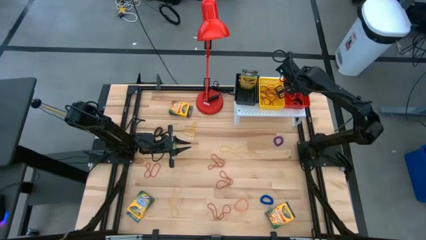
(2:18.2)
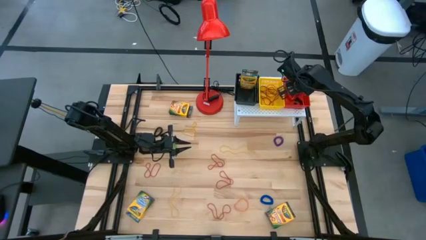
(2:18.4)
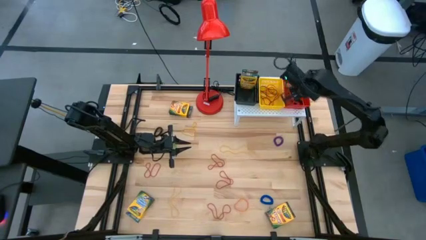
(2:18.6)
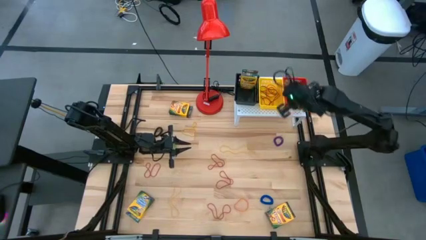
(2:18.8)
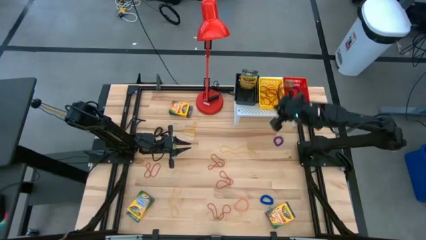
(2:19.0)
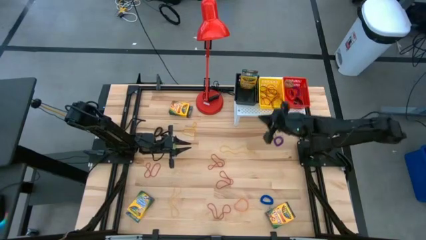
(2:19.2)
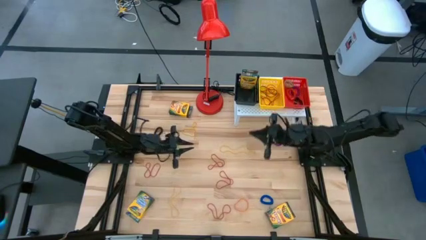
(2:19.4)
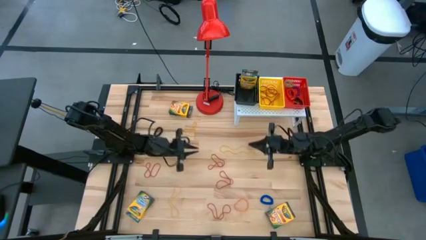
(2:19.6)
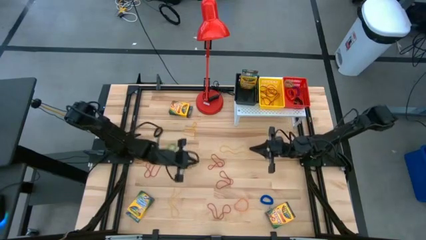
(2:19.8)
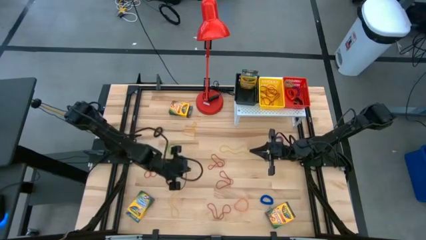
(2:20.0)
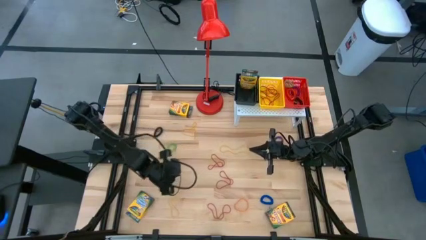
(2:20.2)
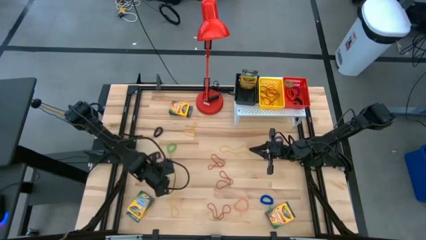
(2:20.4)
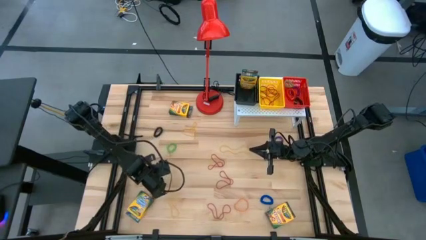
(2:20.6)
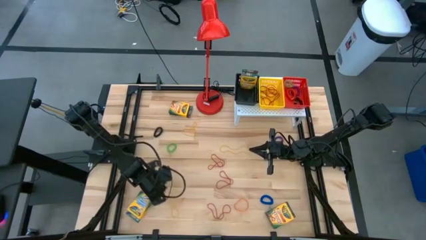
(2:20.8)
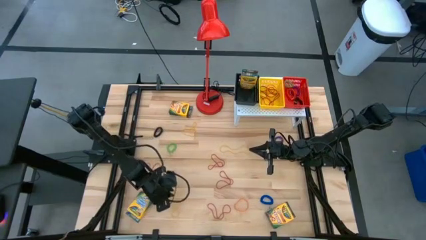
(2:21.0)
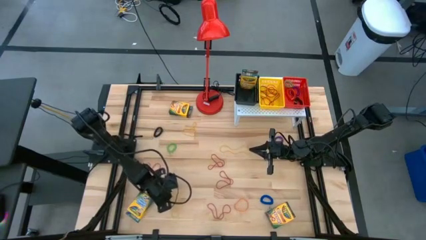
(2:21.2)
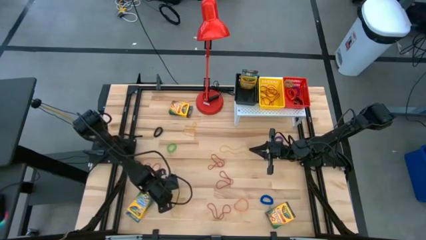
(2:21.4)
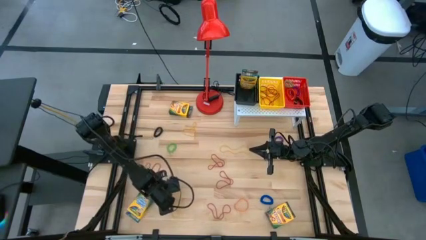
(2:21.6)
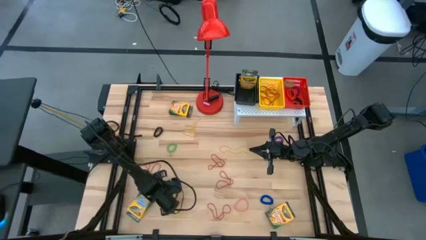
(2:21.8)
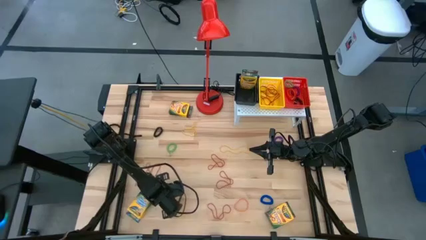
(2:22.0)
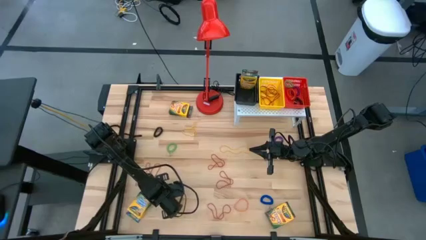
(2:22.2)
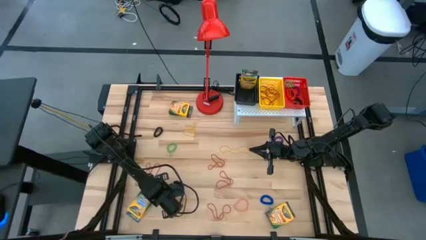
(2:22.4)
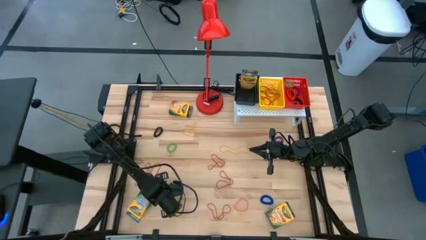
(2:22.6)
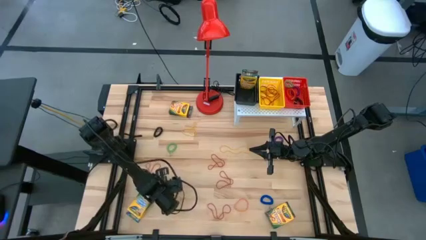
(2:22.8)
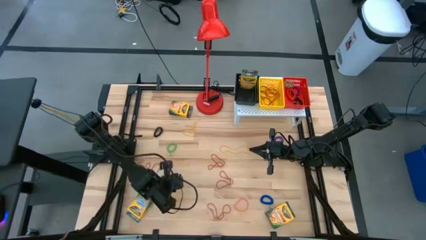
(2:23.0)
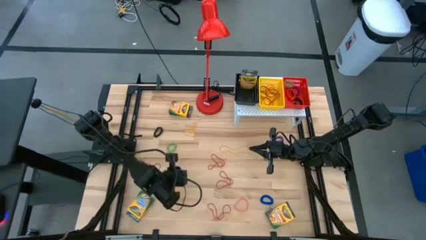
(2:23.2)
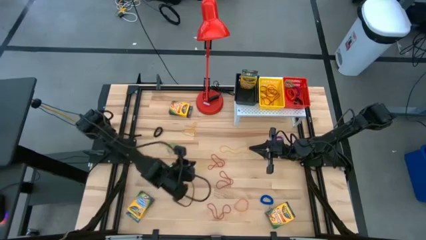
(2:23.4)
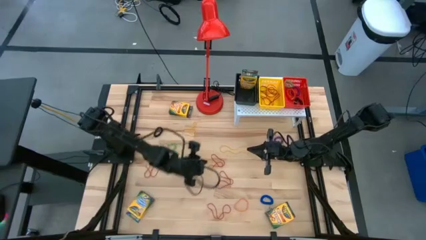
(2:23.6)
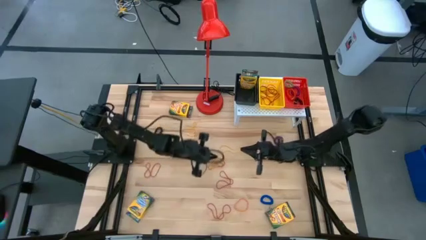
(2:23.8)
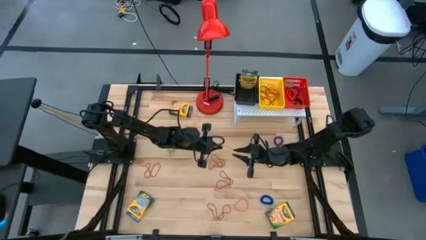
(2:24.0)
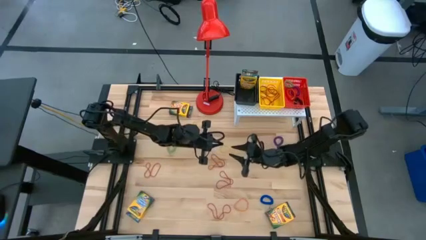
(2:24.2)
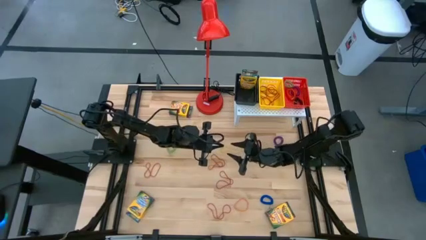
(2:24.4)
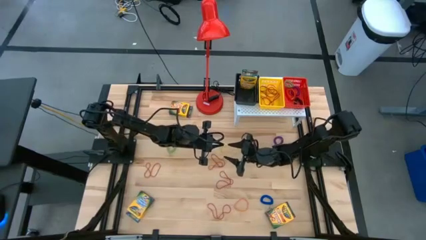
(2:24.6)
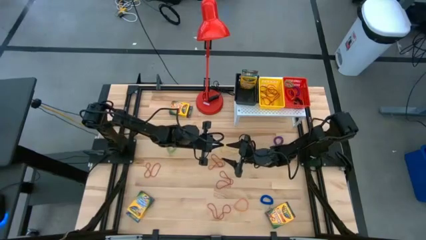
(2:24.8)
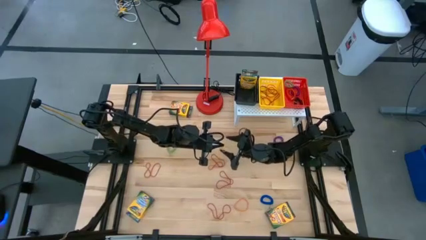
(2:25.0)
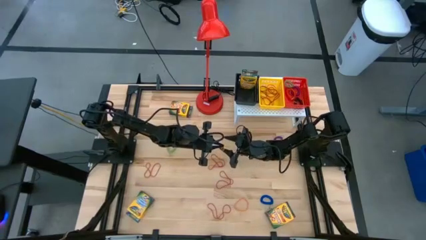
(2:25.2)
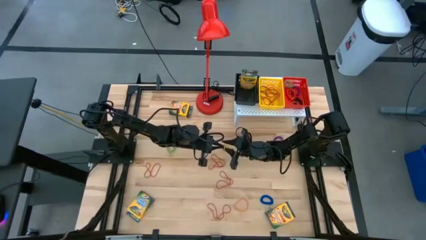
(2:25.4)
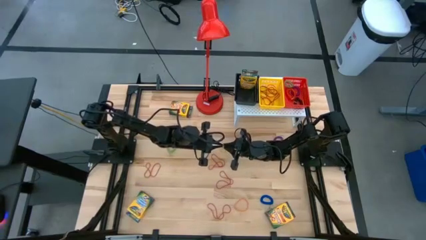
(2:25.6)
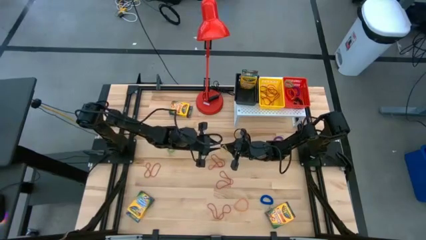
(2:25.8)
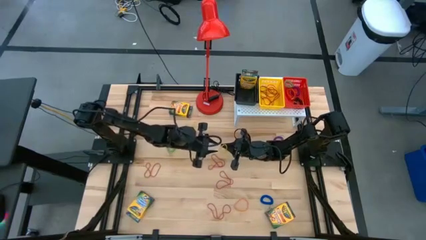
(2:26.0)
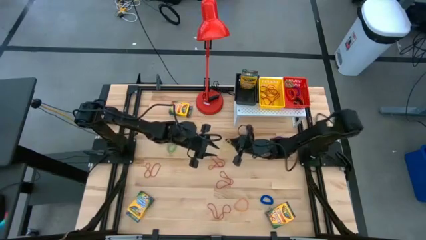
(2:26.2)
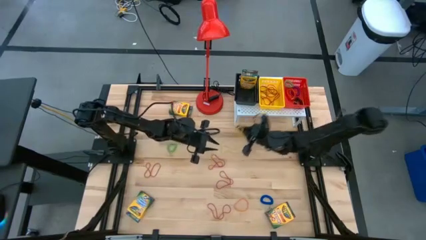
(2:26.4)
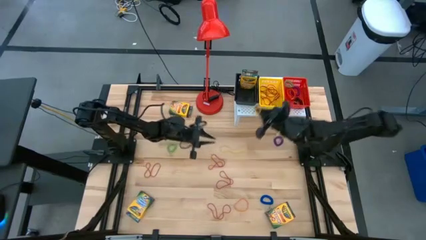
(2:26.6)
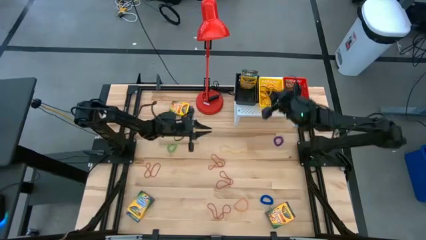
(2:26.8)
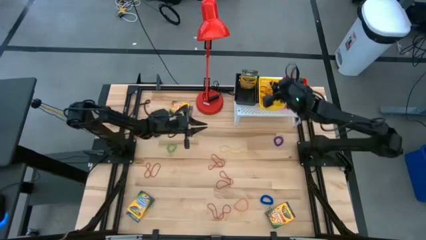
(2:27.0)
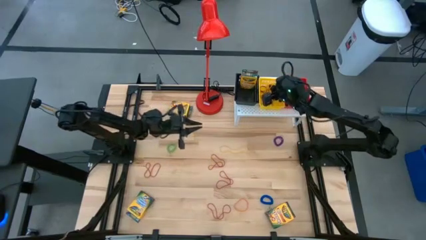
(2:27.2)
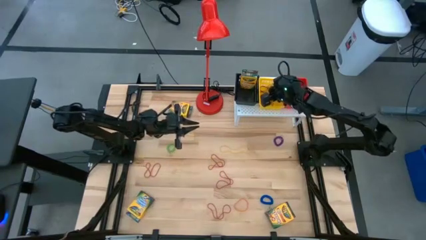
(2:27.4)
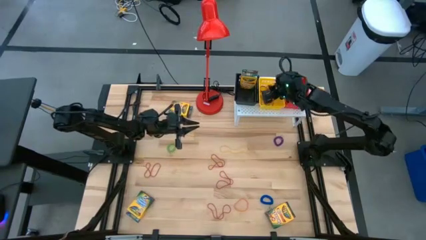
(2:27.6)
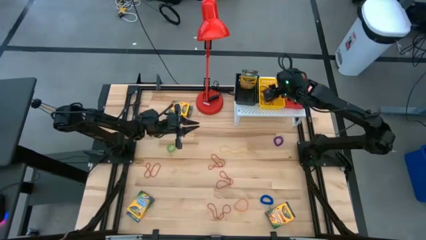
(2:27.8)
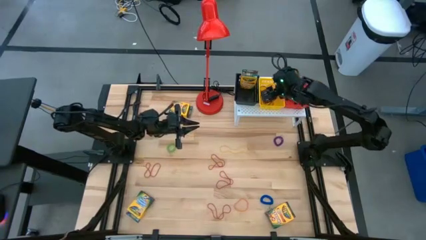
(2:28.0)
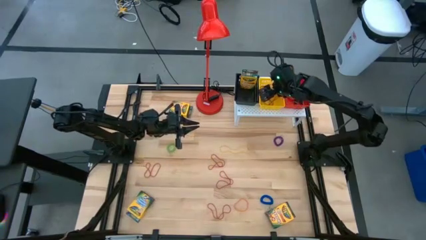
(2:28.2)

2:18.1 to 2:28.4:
Task: Pick & Place Office Desk Supplies
Put the bottom yellow rubber band into the yellow bin

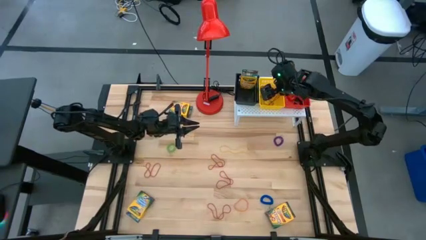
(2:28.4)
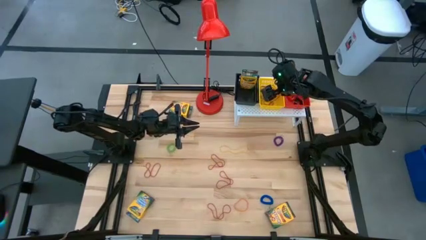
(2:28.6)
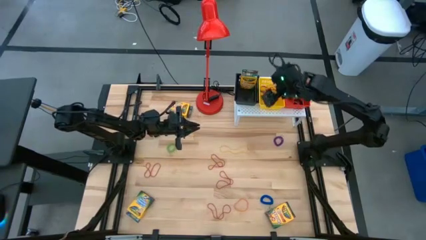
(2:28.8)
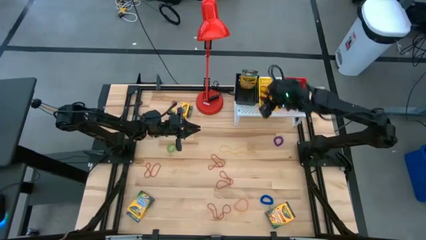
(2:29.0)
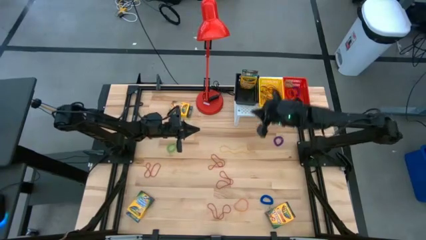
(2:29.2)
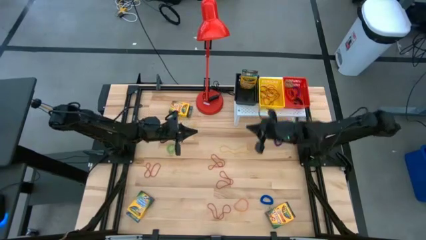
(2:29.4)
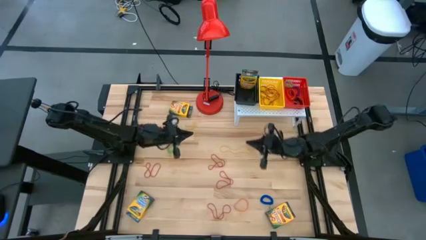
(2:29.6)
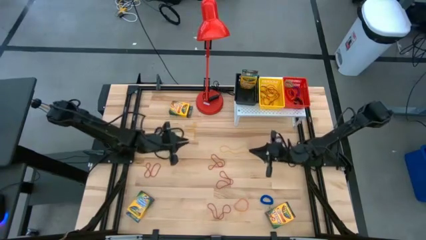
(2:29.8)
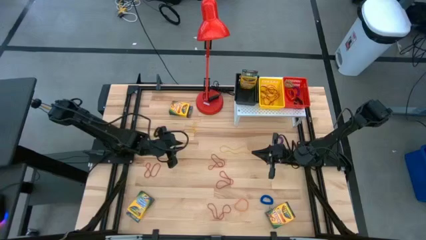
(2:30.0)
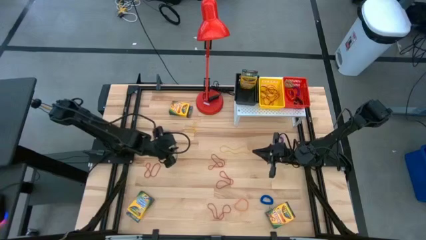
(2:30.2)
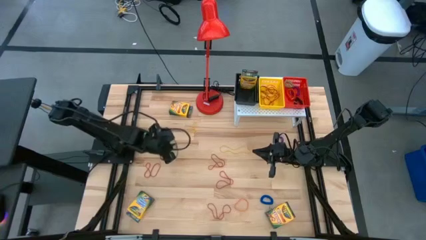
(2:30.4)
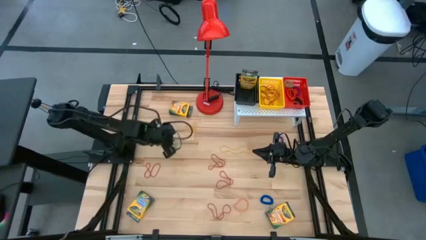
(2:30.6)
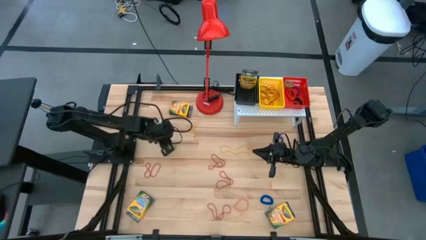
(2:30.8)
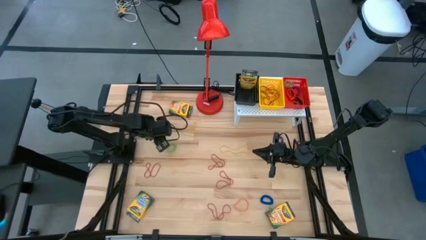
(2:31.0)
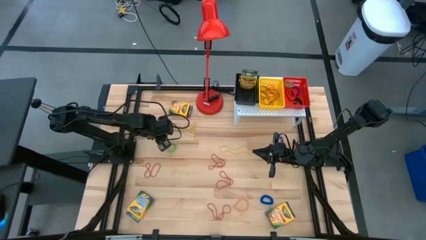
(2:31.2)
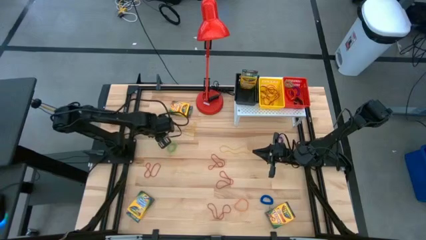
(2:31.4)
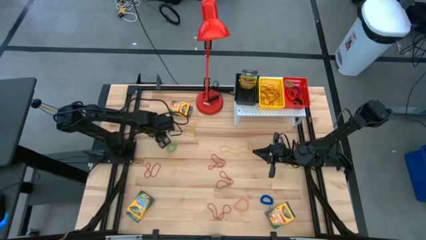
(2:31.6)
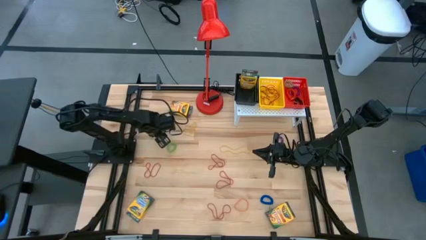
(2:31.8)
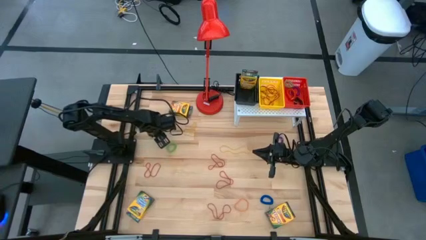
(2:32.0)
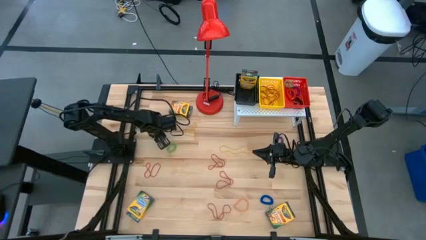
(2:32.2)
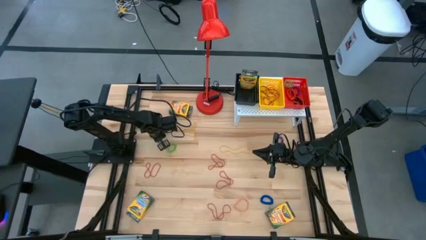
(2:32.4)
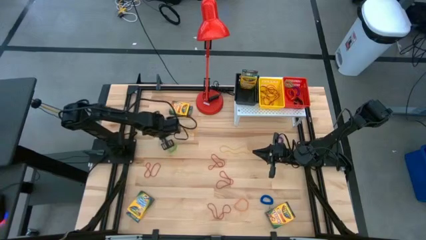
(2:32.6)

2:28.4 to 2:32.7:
Put the black spring keychain into the red bin
